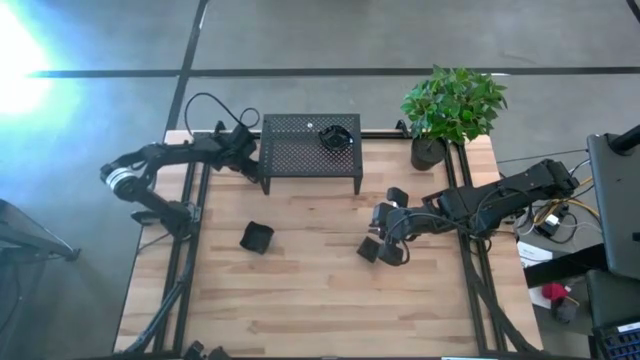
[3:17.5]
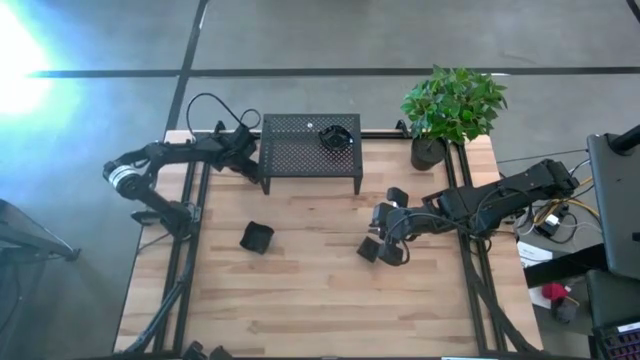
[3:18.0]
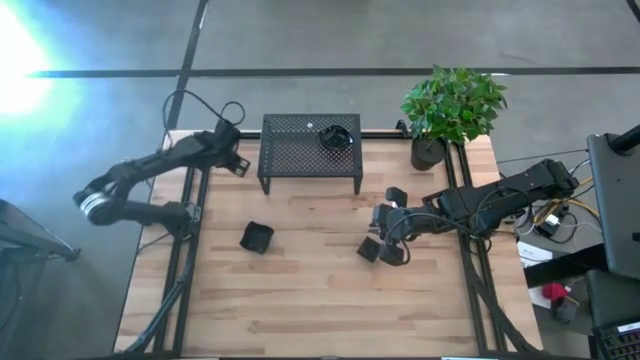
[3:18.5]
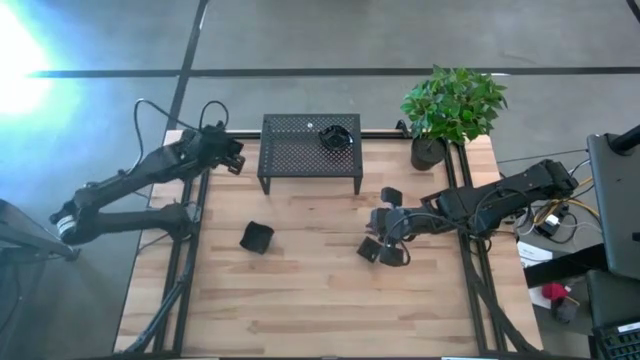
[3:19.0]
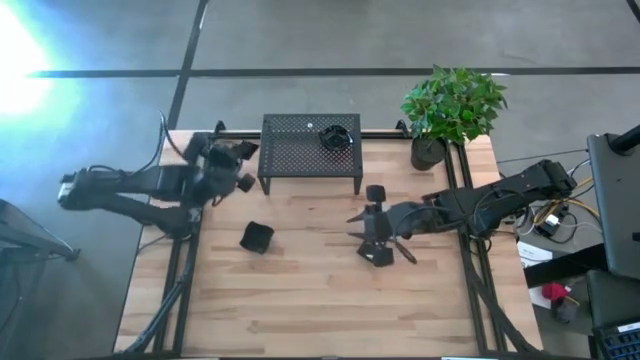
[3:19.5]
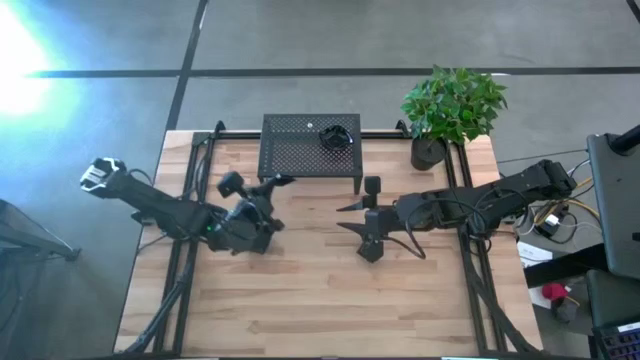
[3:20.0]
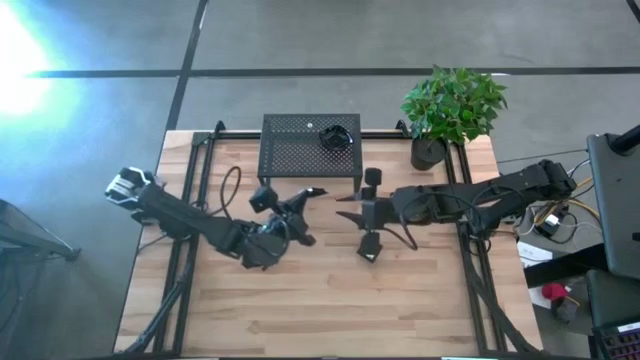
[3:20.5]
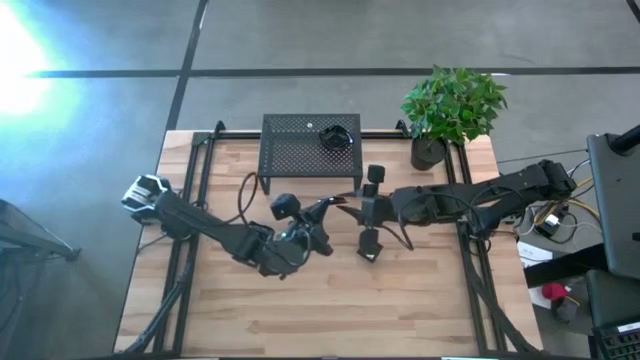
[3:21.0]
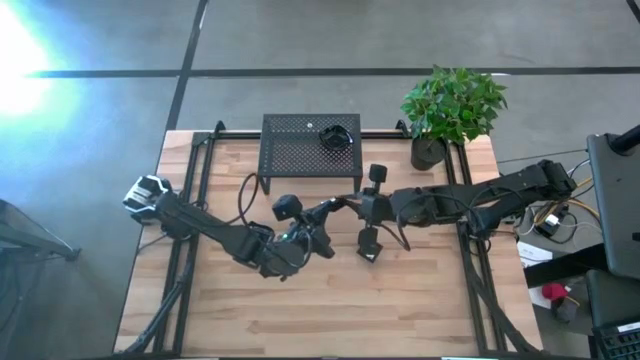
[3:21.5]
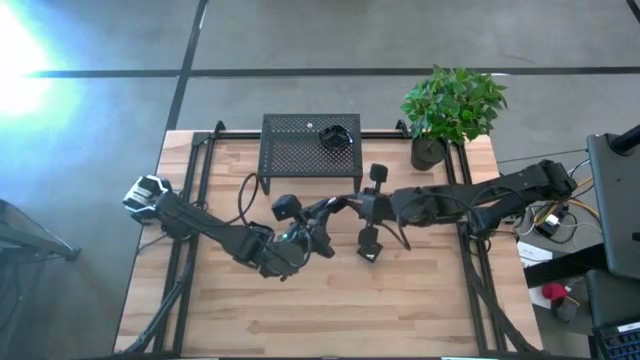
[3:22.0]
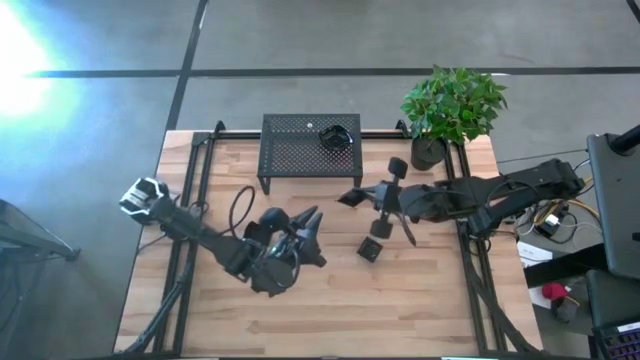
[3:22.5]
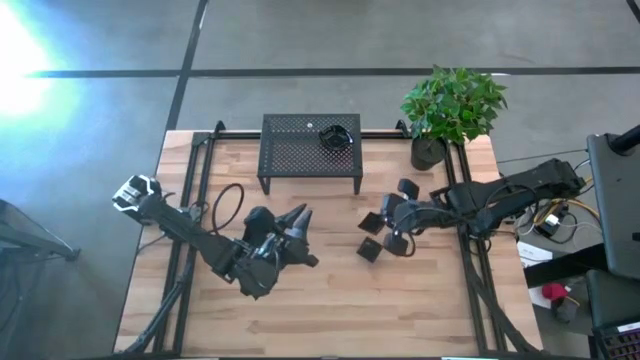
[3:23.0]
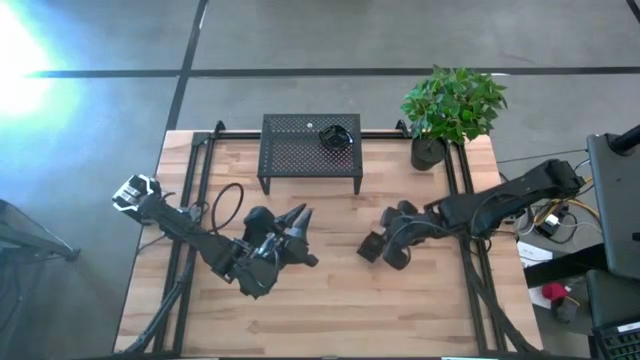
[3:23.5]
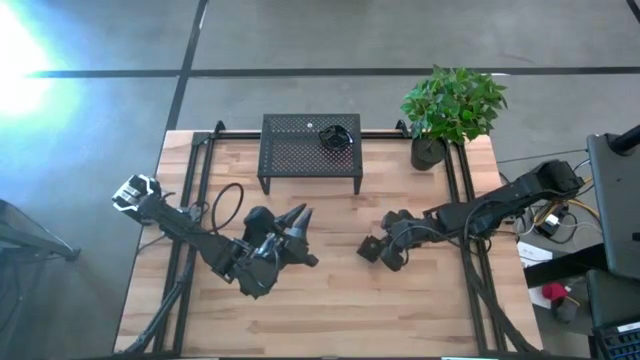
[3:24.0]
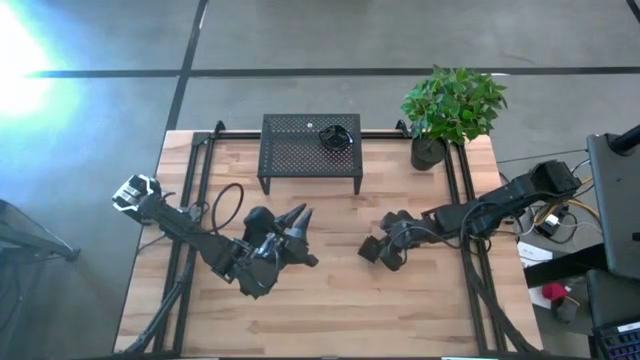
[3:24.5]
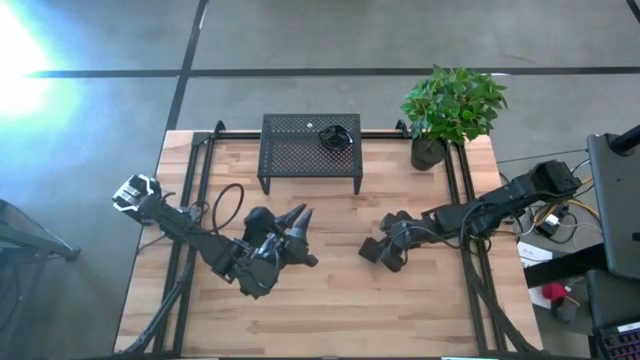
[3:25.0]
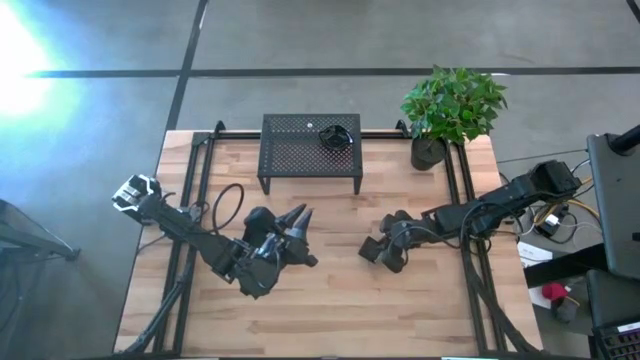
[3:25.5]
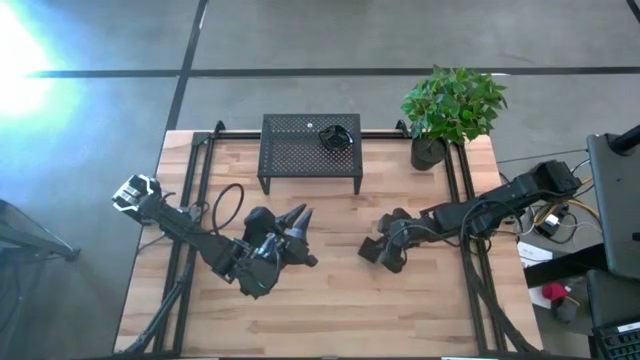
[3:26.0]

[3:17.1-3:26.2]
Task: Pick & Place Mini shaped plates
Stack the black square plate on top of the other black square plate

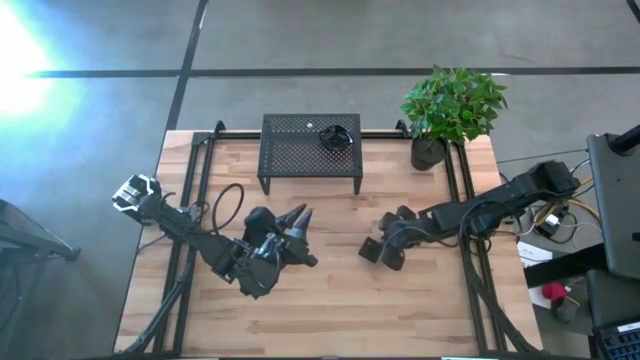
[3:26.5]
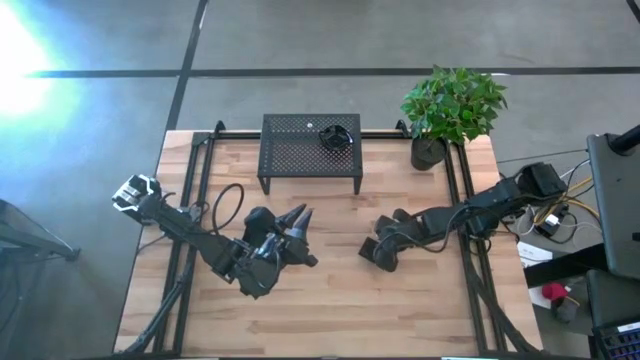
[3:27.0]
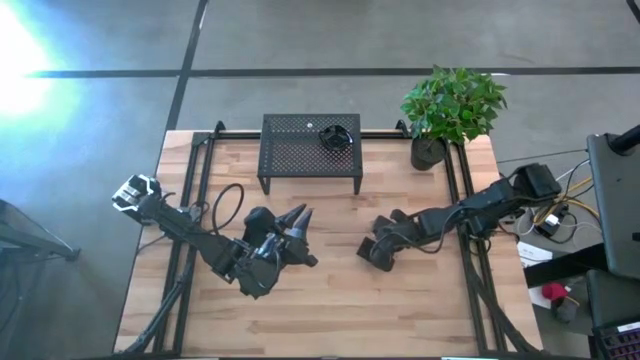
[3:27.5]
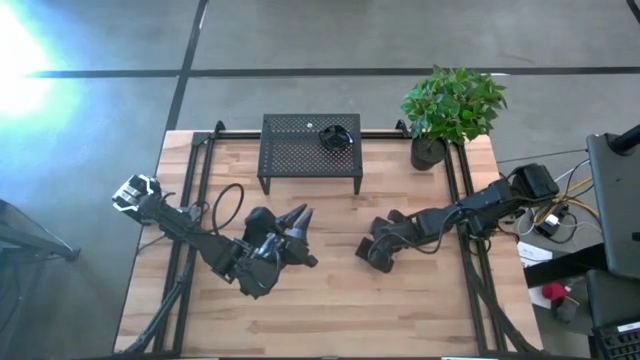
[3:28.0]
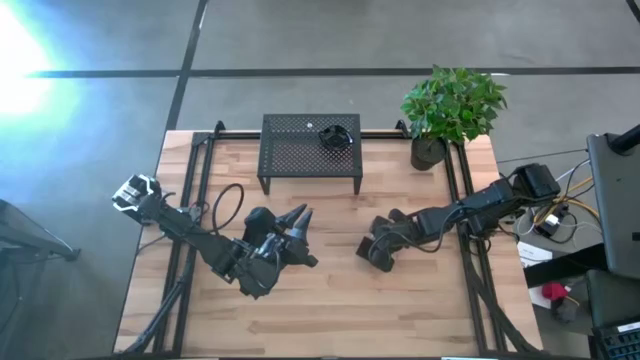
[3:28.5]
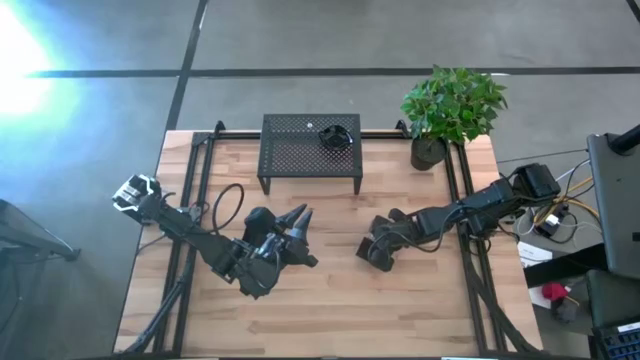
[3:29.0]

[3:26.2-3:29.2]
Put the stacked black square plates on the shelf

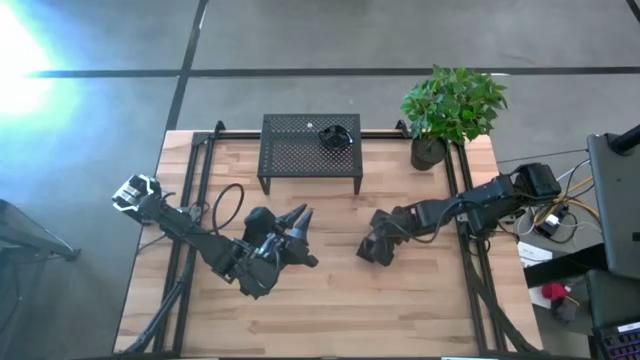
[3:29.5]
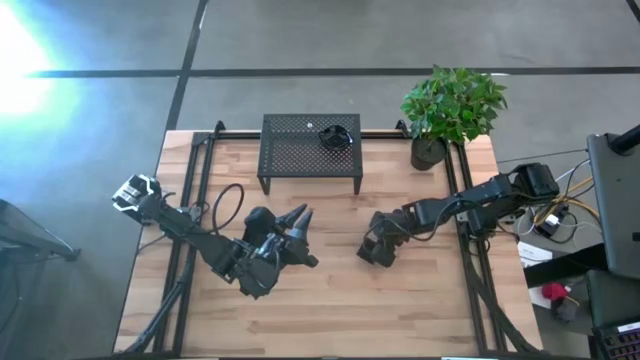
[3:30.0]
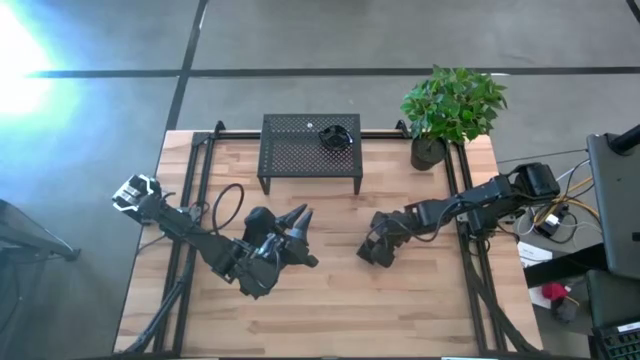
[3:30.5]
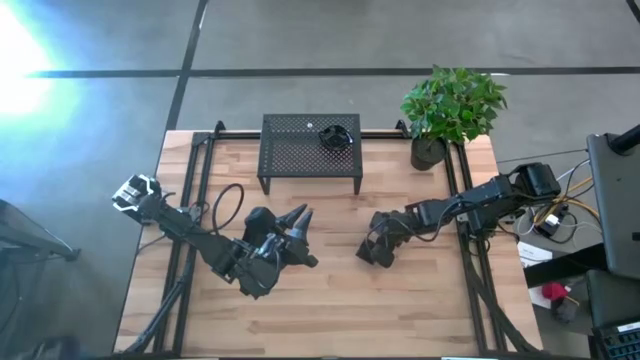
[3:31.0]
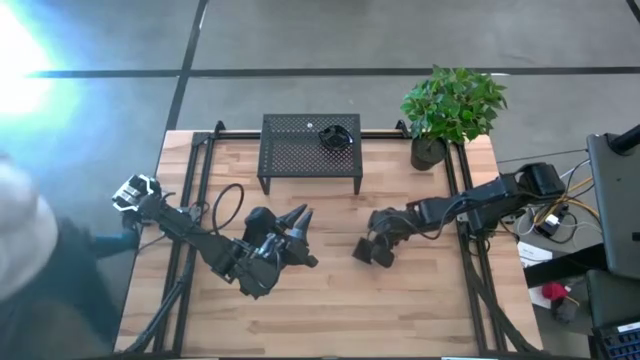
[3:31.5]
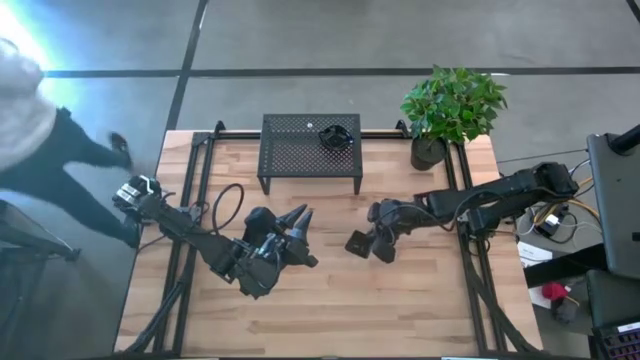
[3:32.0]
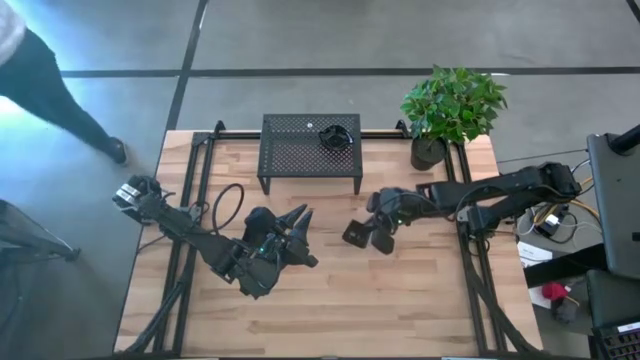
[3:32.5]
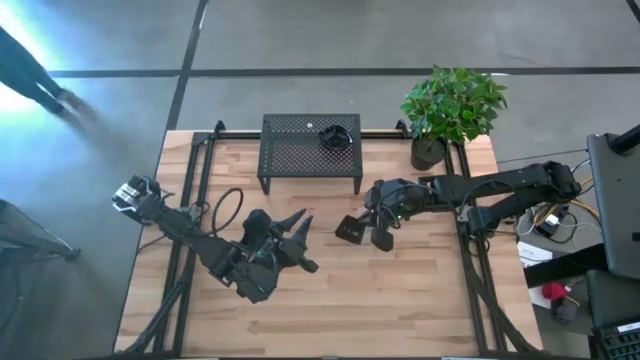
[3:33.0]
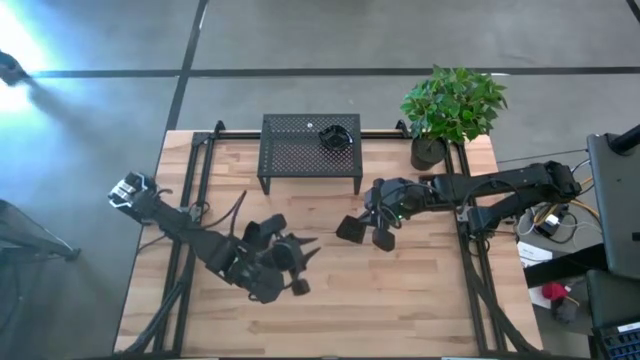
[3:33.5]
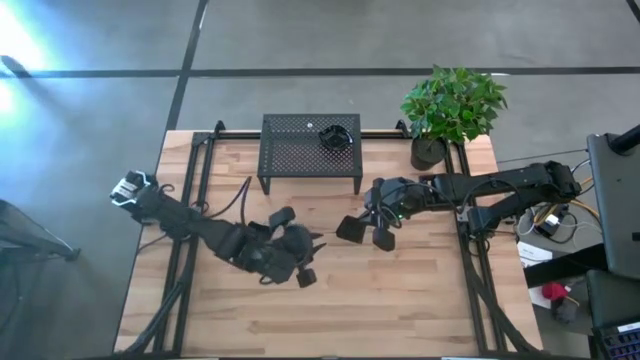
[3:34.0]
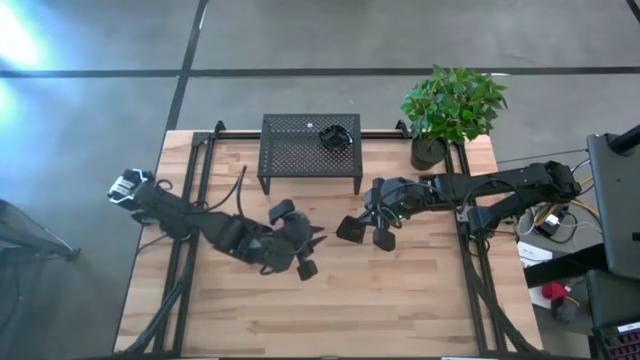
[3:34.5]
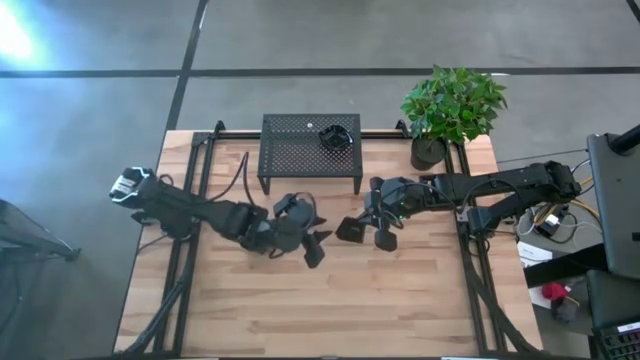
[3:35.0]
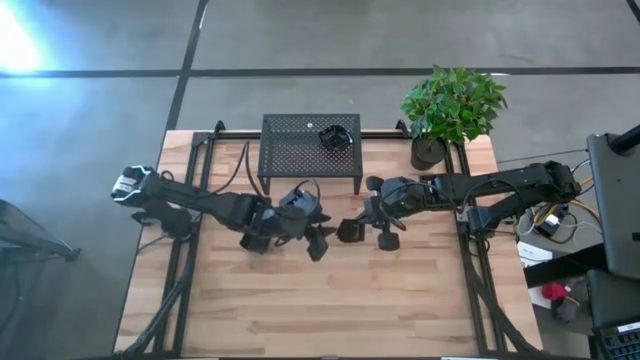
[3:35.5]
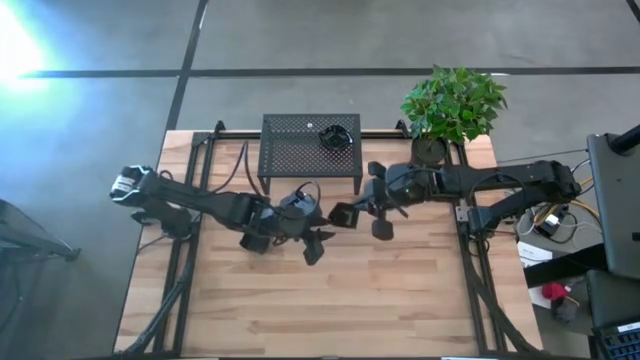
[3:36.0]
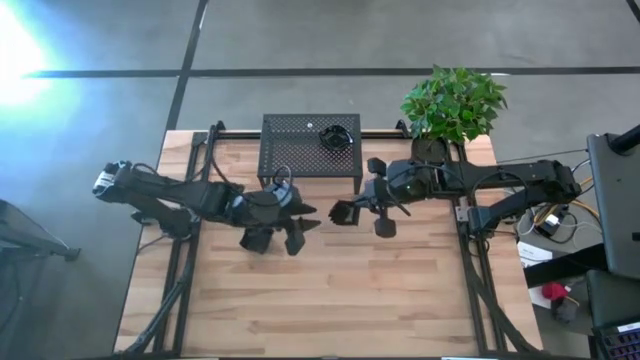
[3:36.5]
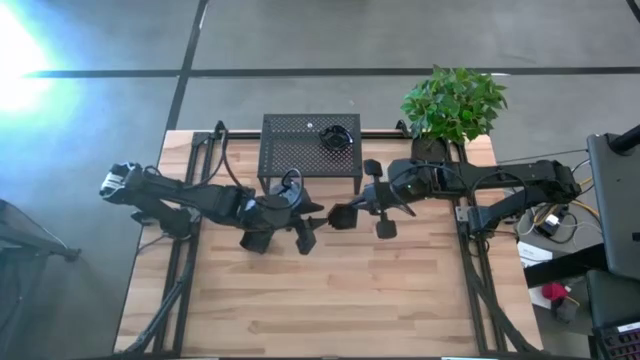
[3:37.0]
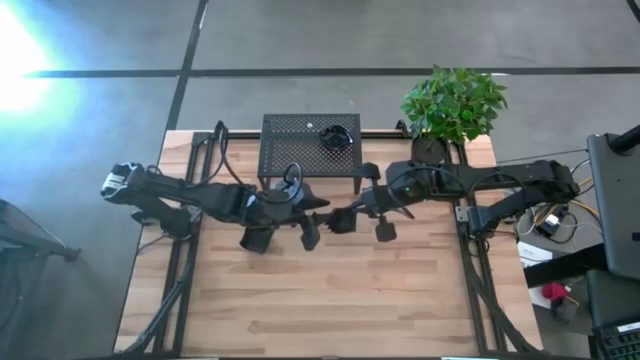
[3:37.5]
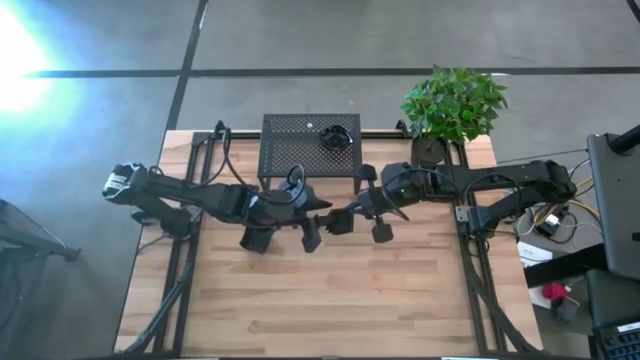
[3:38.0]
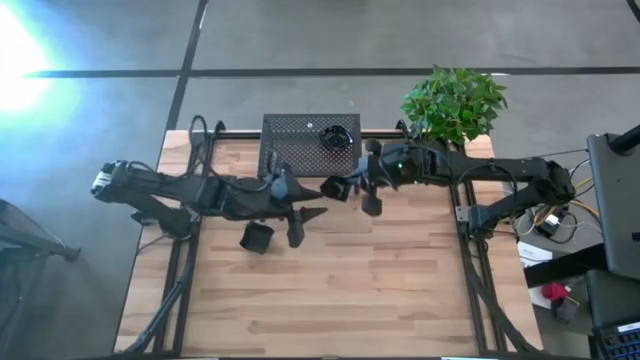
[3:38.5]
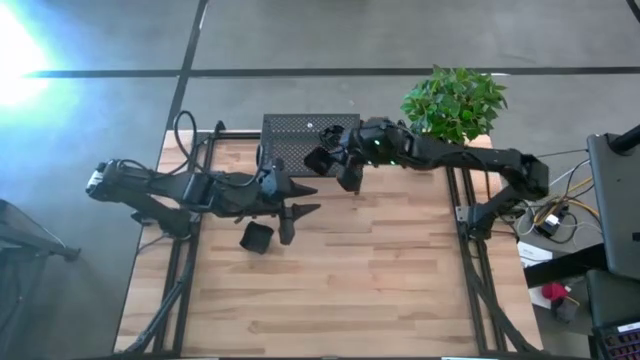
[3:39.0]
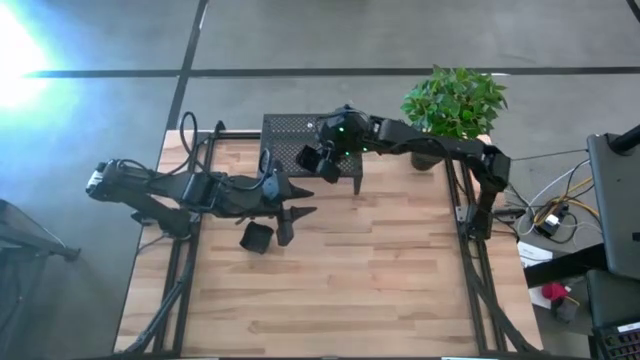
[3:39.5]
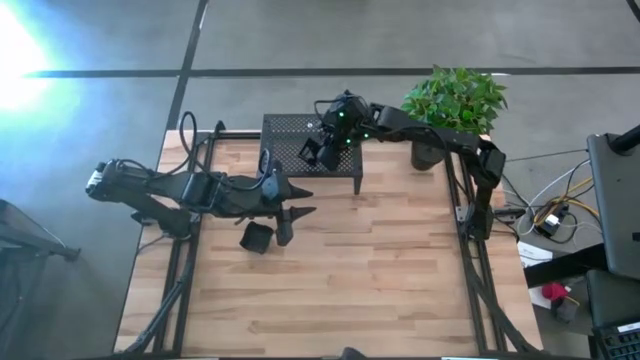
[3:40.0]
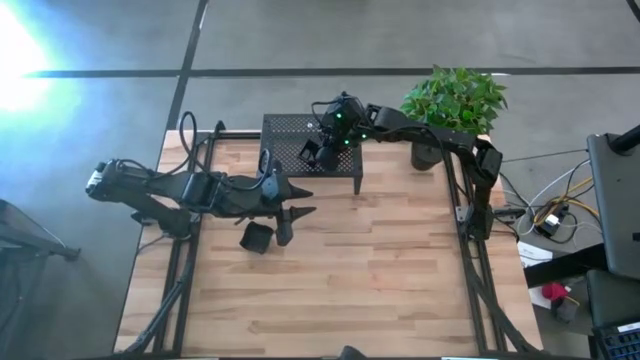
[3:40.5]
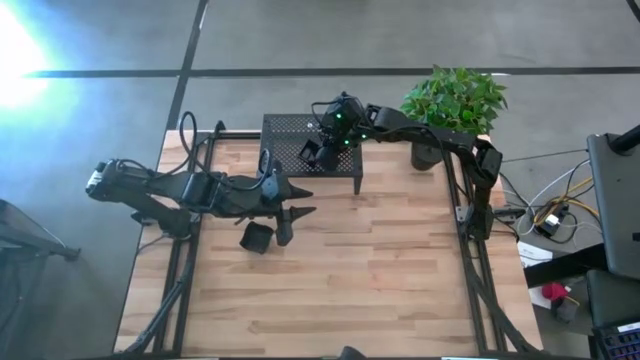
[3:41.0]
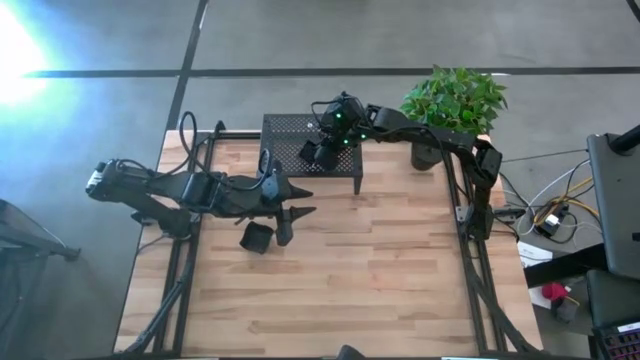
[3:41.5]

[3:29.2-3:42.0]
Put the stacked black square plates on the shelf
